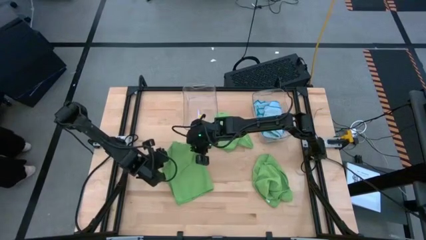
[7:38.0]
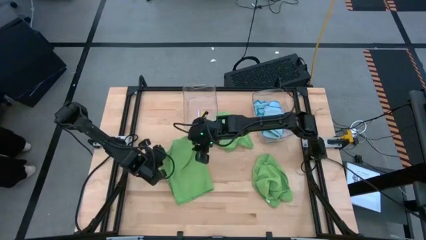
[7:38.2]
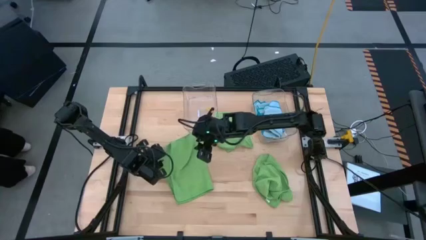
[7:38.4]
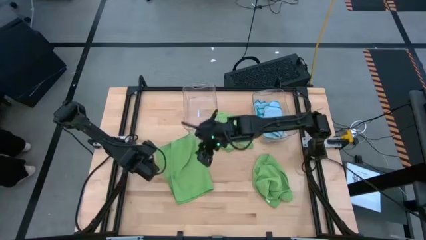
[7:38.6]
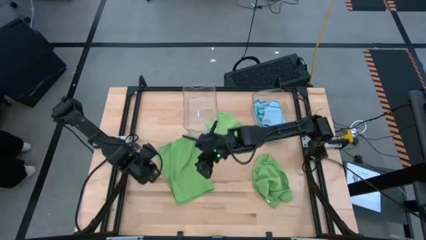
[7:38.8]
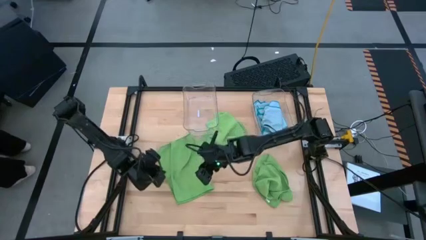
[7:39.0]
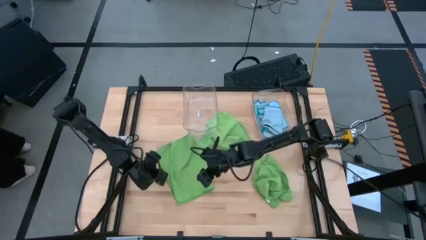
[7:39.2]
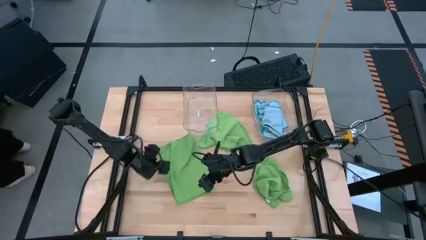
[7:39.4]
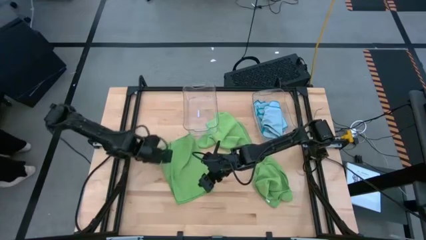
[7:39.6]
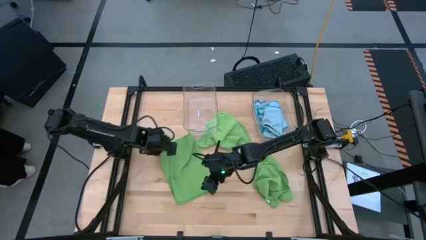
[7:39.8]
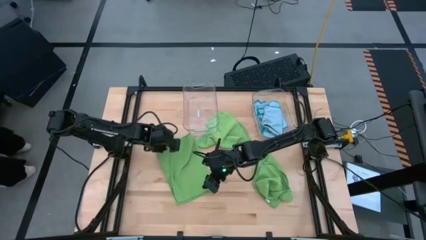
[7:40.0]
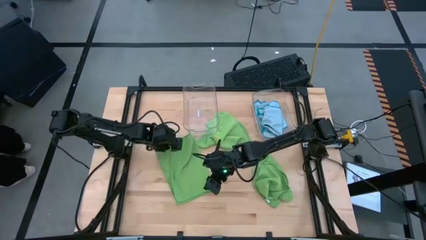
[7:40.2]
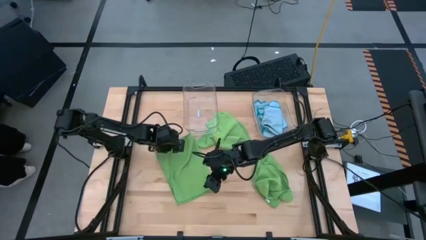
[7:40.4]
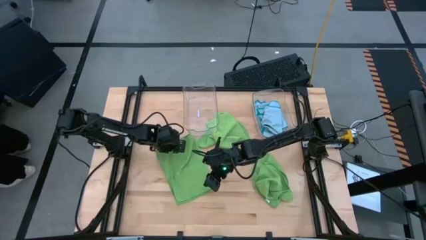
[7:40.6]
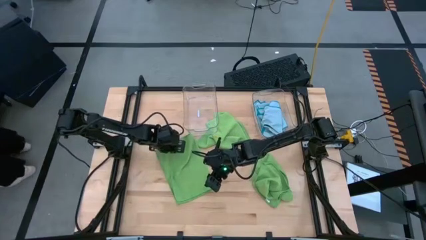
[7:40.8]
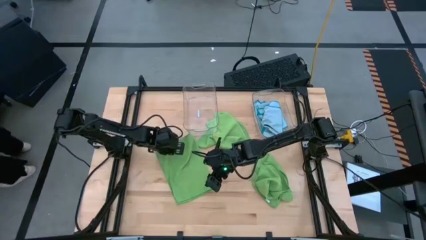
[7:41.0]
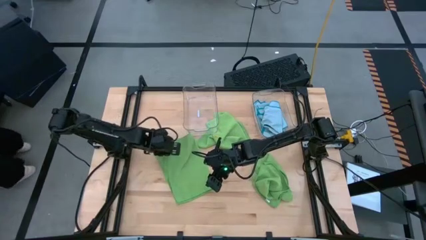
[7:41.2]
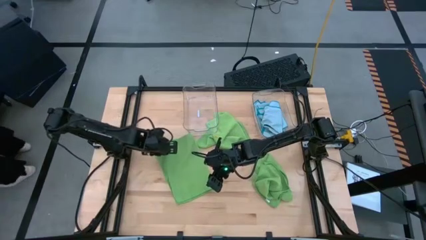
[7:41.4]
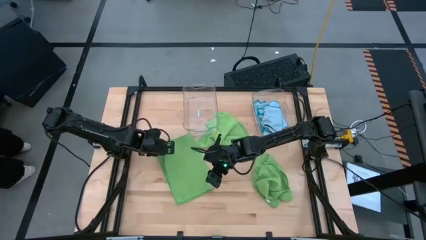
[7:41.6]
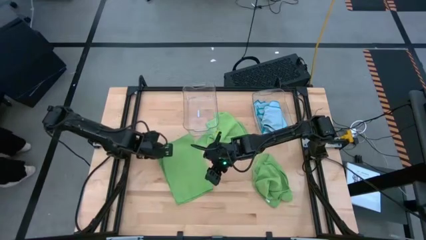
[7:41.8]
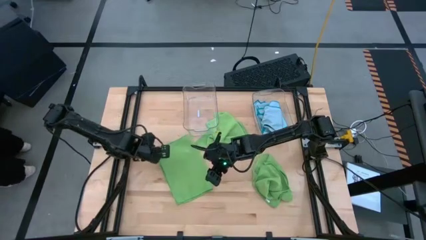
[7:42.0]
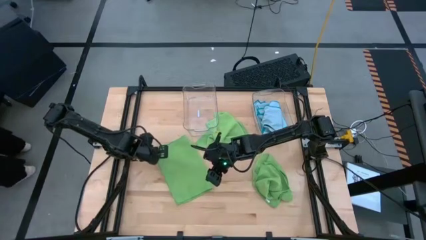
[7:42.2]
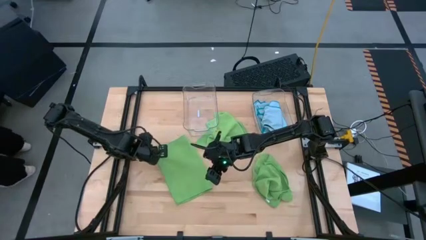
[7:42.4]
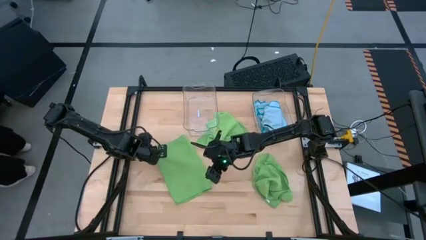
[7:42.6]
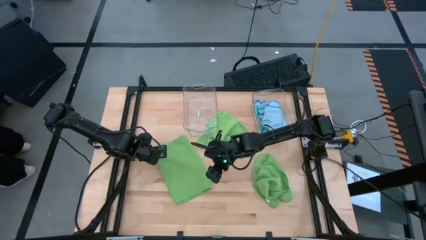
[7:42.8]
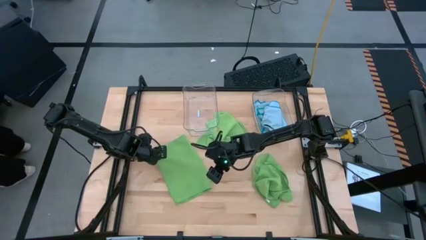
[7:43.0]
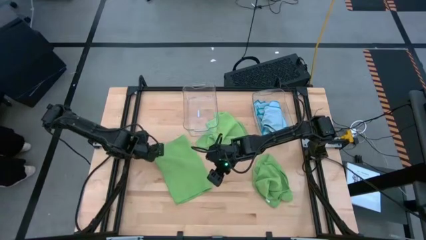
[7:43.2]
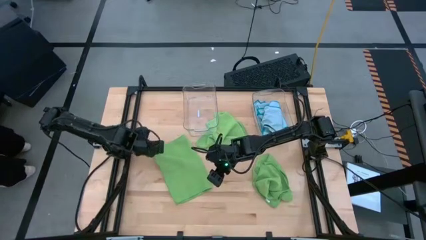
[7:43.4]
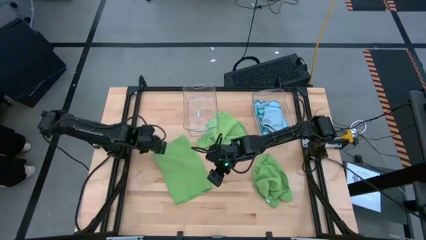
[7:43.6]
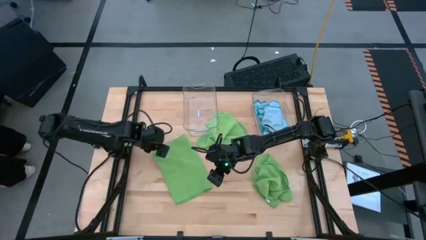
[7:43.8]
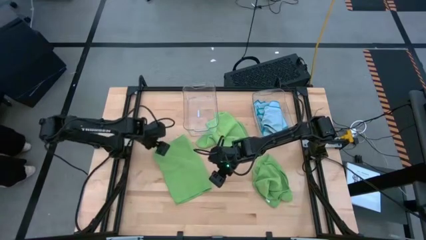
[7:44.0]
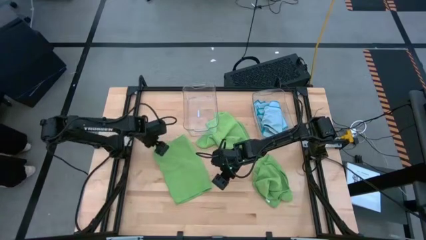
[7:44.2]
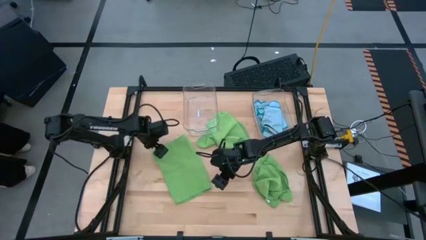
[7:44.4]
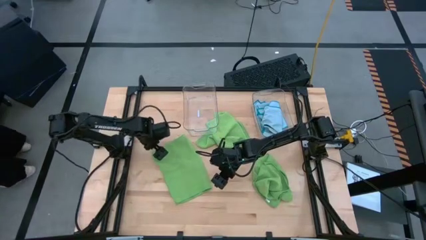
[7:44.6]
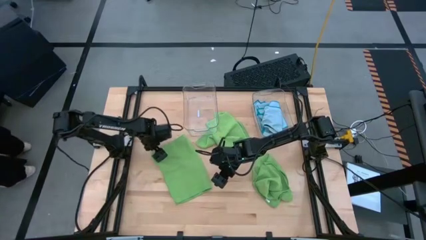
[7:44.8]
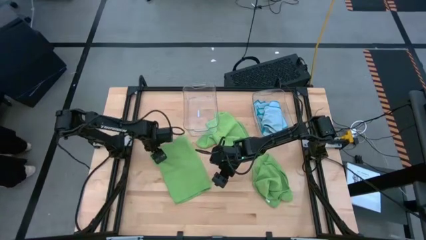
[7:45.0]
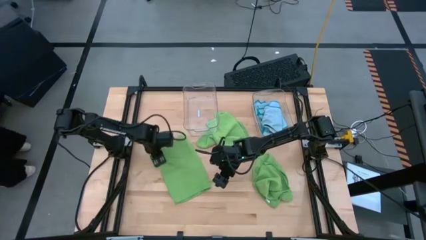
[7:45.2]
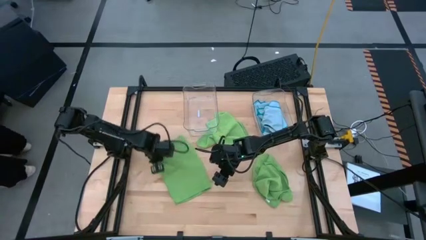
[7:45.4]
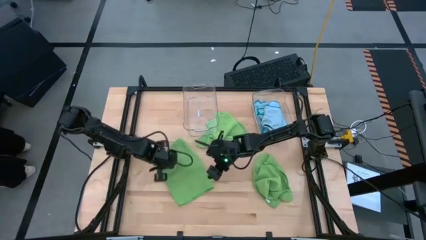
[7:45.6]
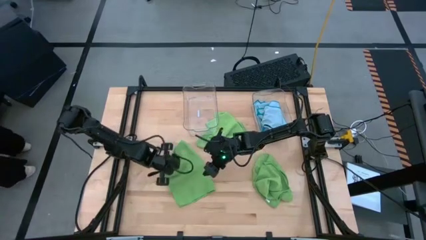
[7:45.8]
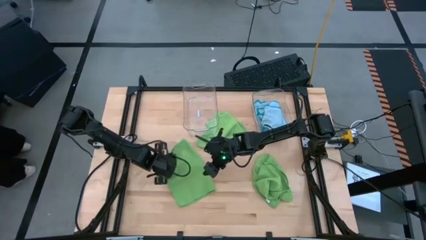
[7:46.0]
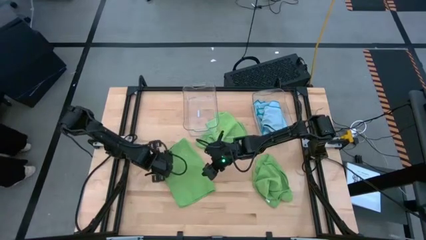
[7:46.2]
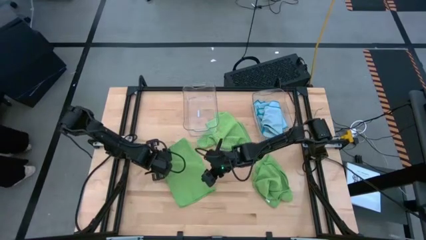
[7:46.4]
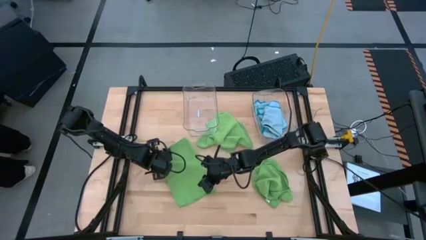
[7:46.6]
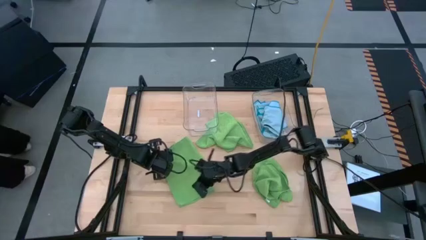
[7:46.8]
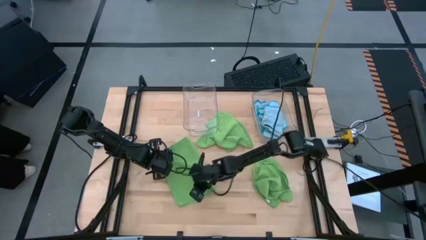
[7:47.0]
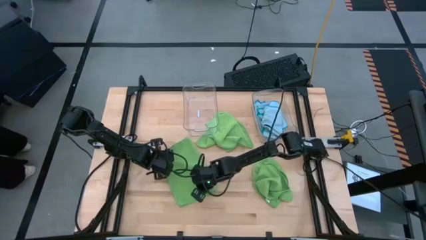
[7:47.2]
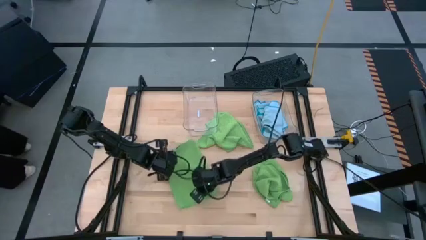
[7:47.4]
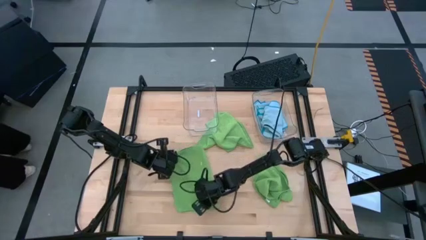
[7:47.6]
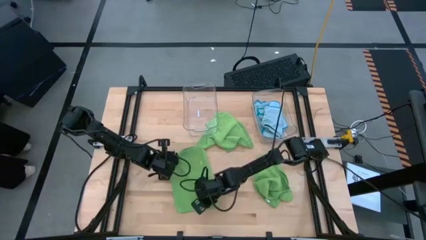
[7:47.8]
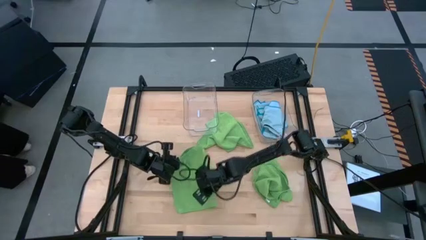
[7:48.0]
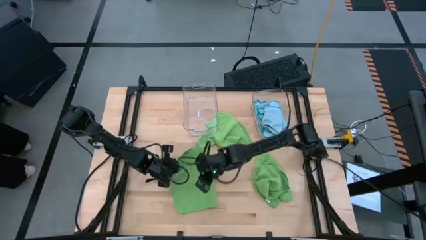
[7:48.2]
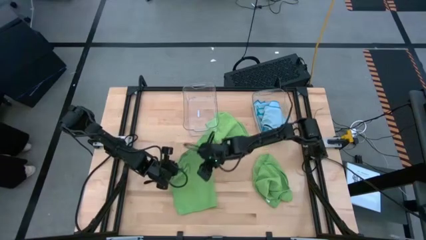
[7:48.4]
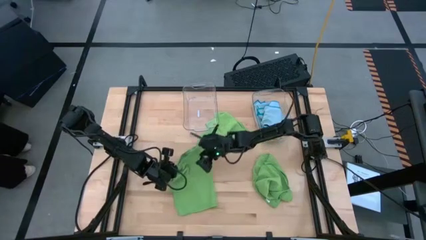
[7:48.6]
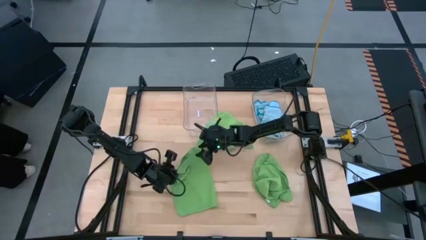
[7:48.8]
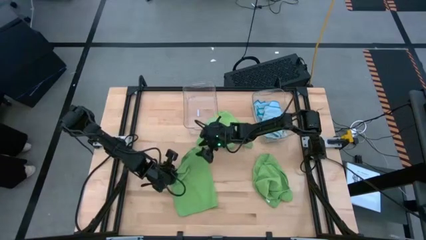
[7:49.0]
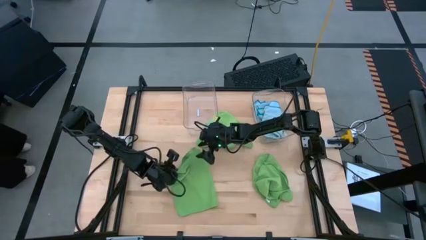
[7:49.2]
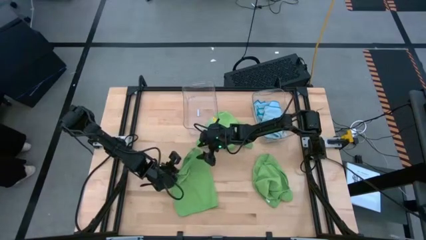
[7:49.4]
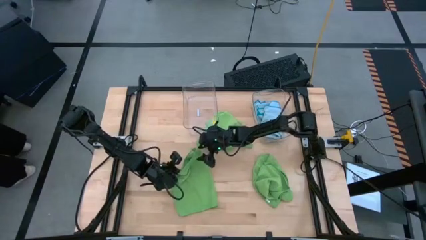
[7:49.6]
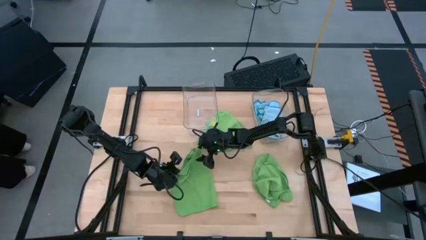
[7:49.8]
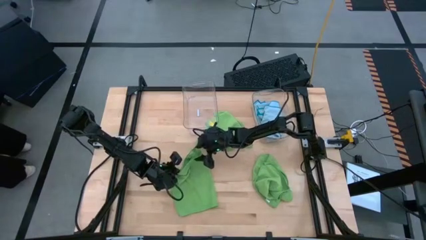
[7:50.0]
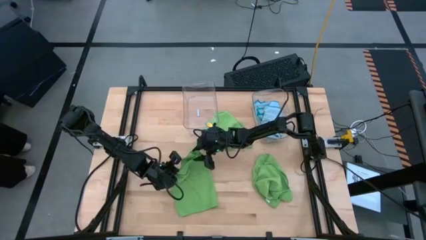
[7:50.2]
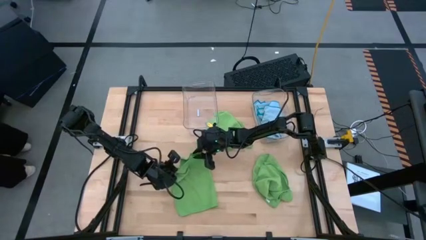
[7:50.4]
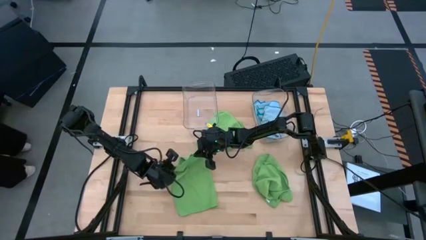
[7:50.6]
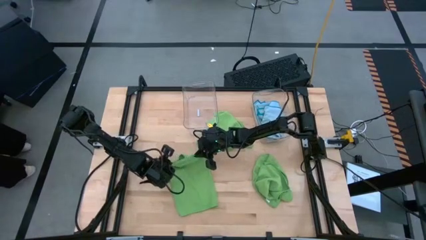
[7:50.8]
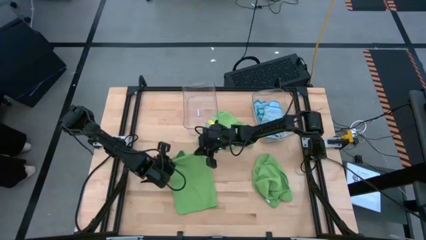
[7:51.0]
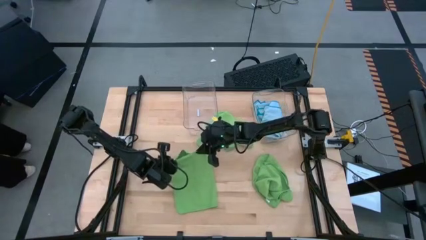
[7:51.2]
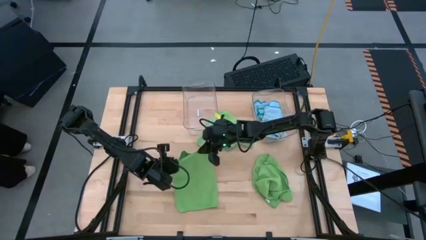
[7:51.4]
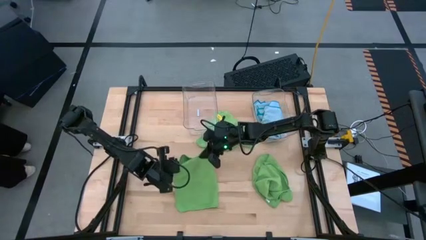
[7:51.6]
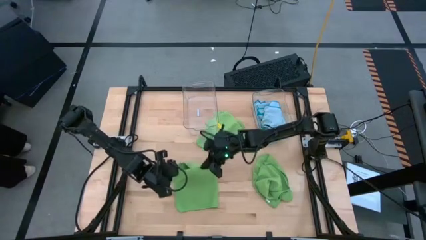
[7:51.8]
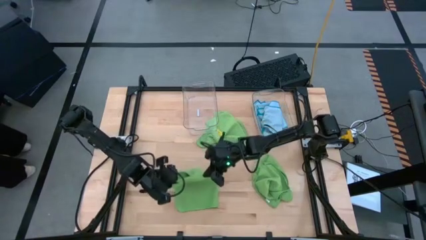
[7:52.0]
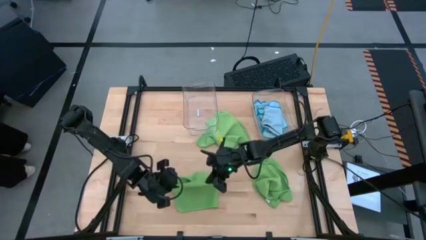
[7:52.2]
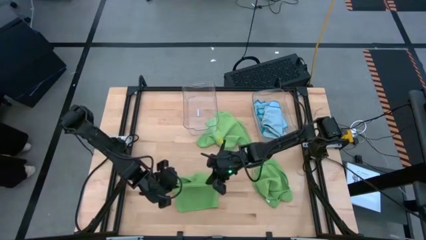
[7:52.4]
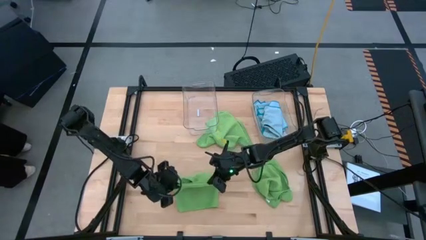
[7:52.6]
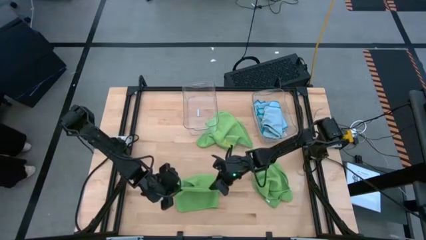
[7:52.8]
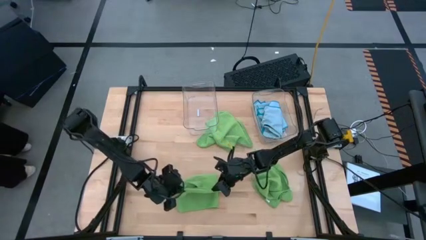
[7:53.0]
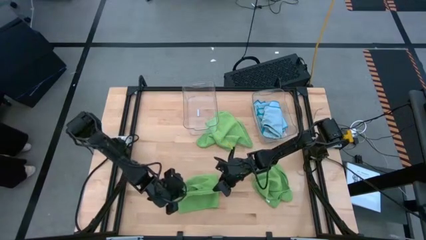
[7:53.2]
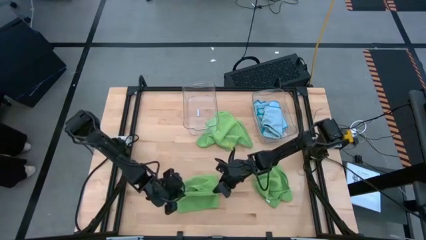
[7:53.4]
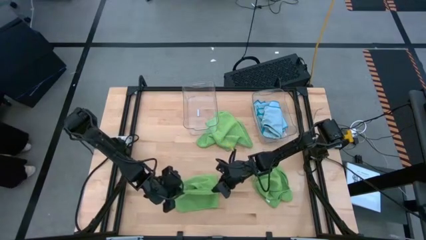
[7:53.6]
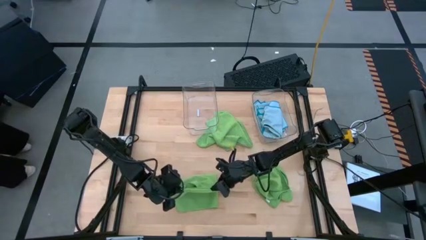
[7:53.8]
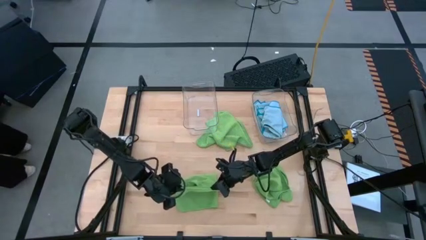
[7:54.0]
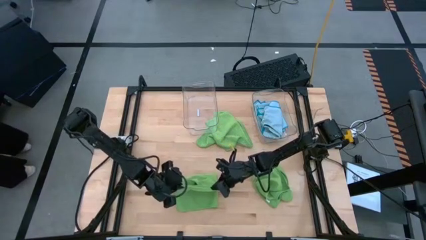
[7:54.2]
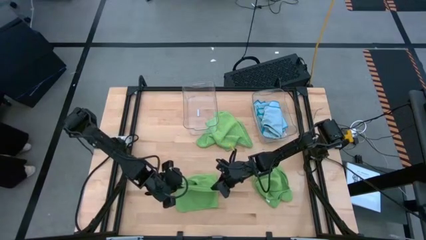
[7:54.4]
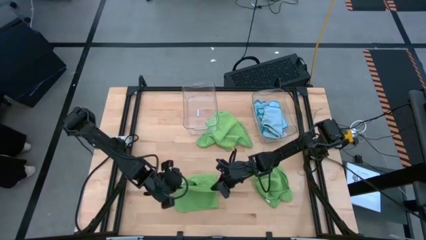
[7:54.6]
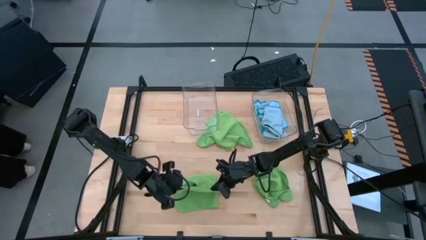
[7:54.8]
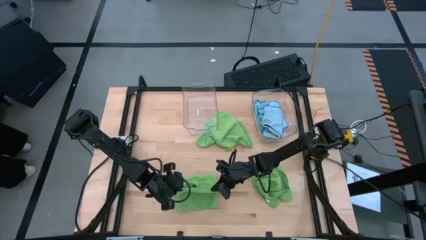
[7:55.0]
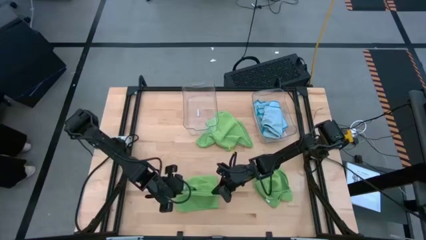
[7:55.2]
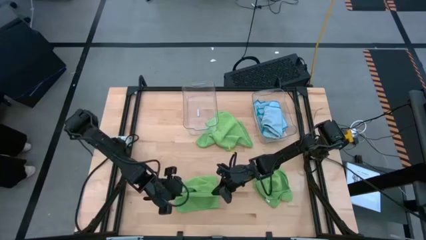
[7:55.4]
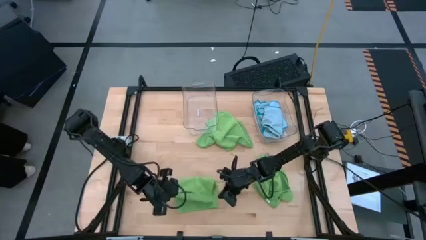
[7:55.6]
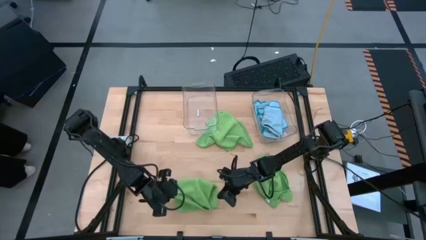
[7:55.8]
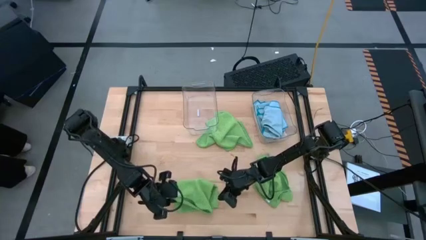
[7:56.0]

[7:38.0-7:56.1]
Task: Fold microfiber towels
Fold the bottom left green microfiber towel
